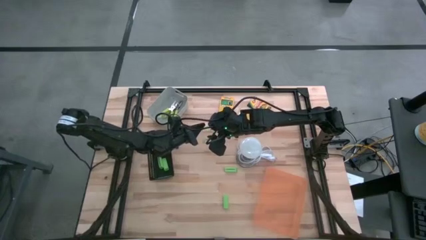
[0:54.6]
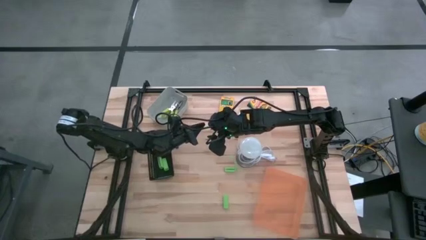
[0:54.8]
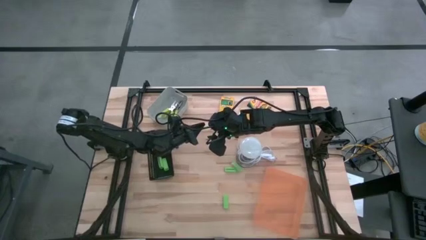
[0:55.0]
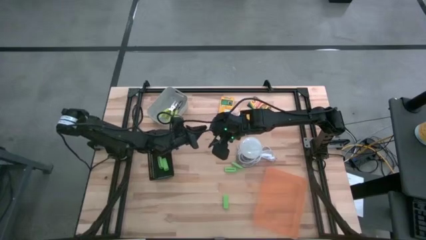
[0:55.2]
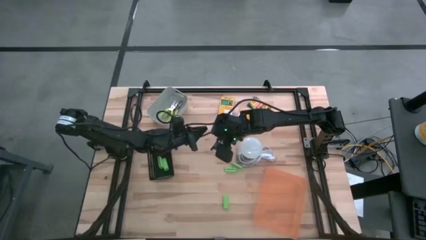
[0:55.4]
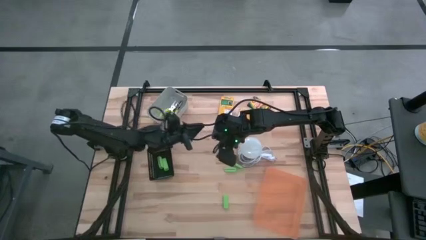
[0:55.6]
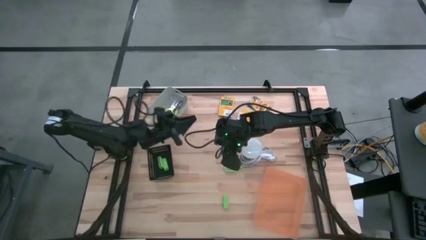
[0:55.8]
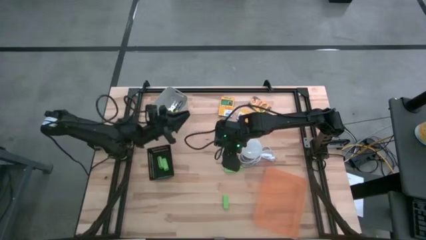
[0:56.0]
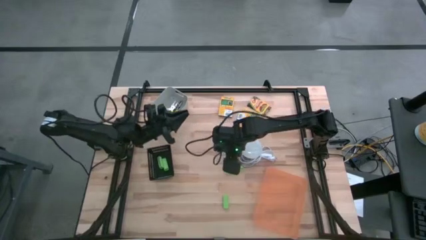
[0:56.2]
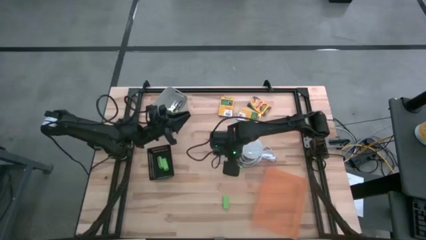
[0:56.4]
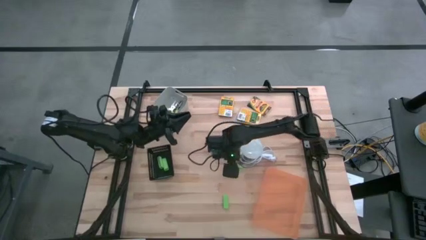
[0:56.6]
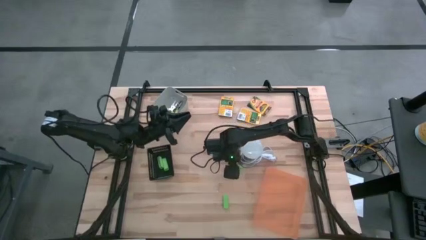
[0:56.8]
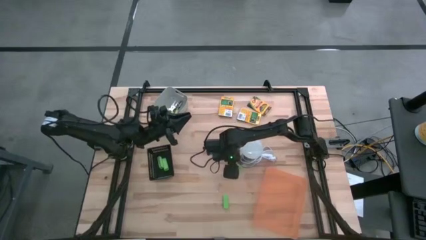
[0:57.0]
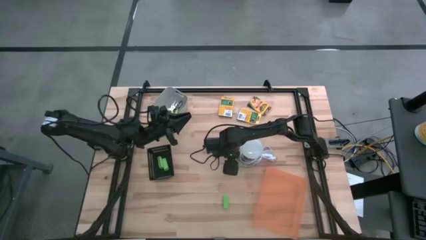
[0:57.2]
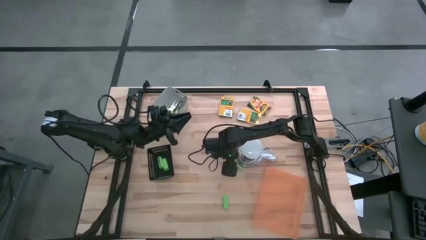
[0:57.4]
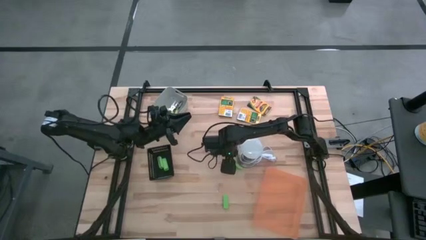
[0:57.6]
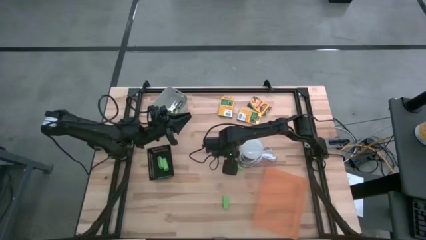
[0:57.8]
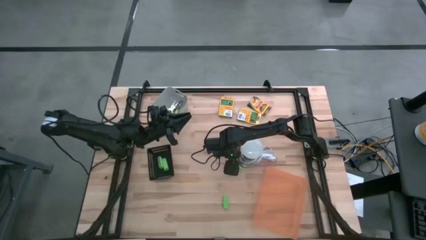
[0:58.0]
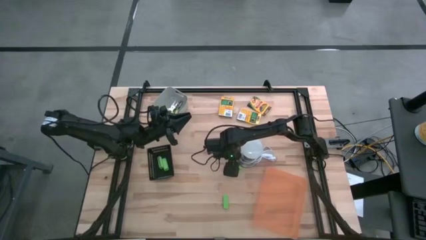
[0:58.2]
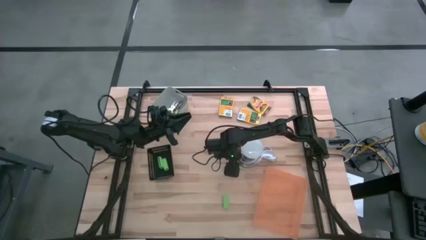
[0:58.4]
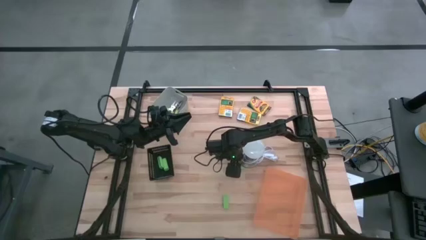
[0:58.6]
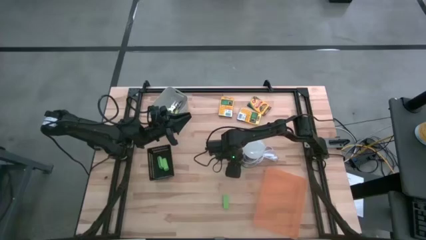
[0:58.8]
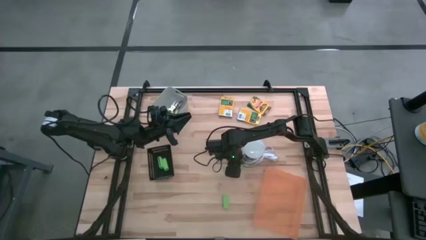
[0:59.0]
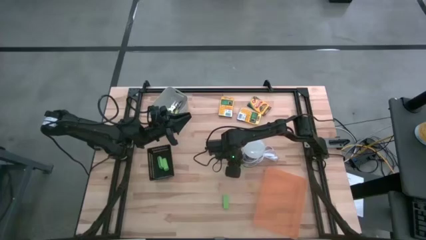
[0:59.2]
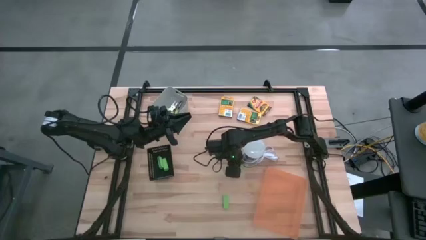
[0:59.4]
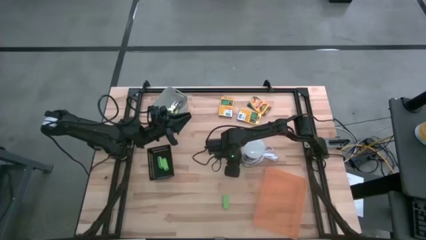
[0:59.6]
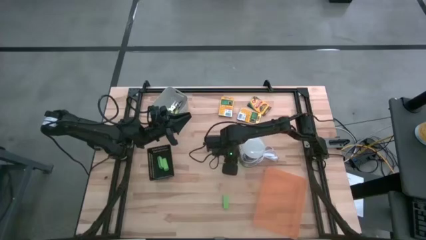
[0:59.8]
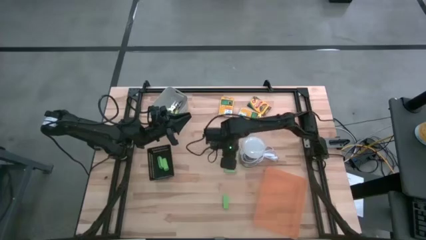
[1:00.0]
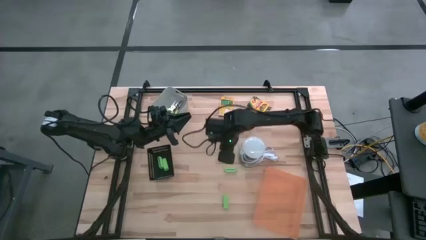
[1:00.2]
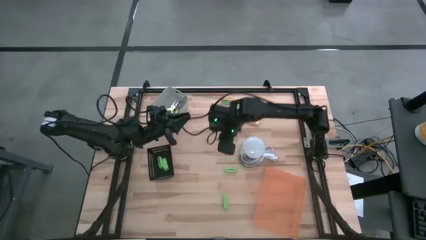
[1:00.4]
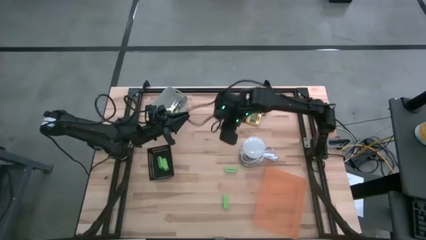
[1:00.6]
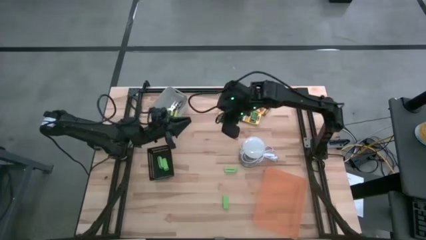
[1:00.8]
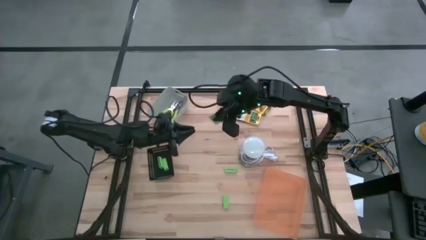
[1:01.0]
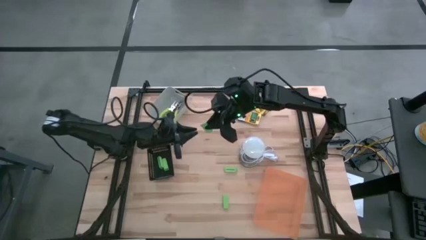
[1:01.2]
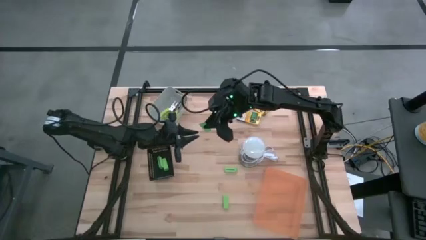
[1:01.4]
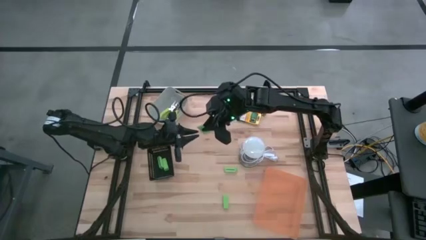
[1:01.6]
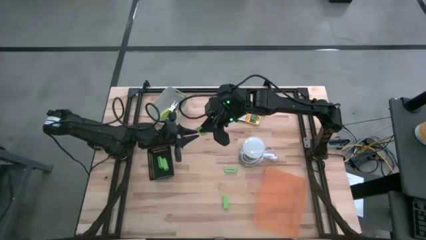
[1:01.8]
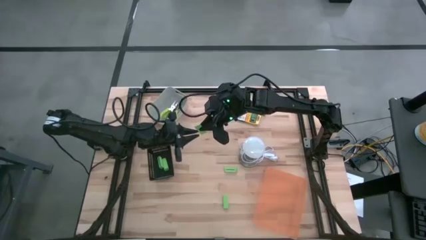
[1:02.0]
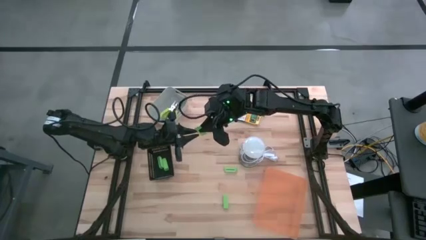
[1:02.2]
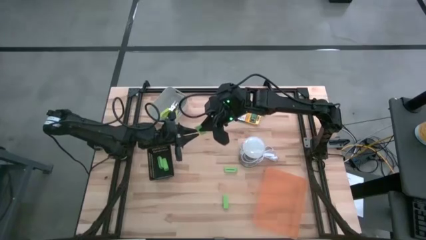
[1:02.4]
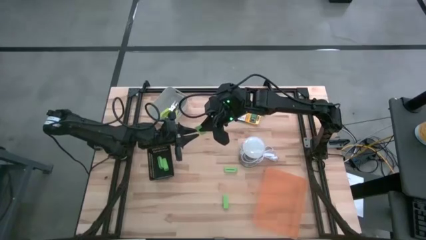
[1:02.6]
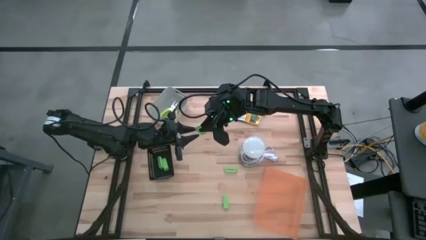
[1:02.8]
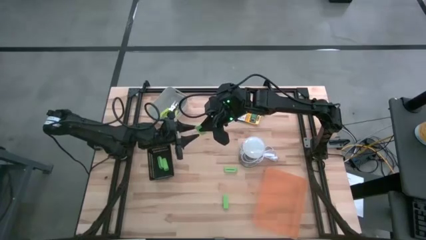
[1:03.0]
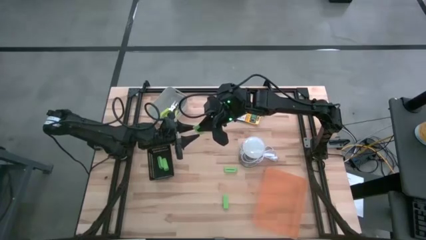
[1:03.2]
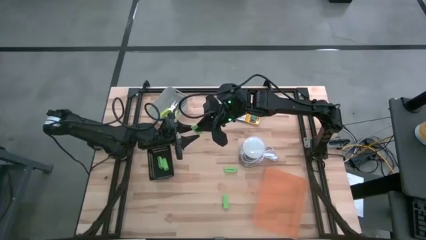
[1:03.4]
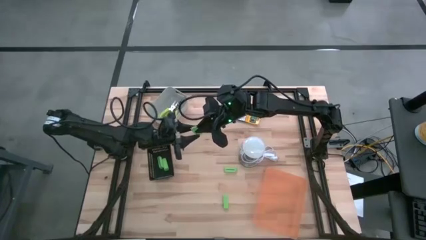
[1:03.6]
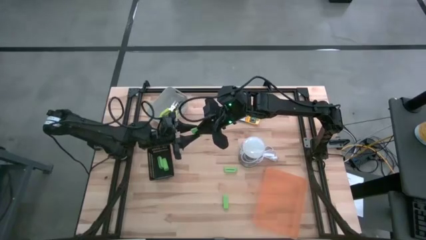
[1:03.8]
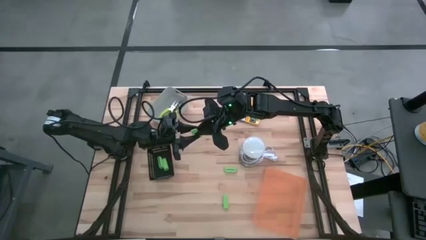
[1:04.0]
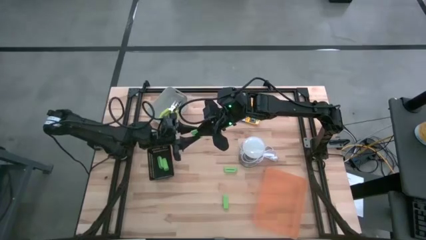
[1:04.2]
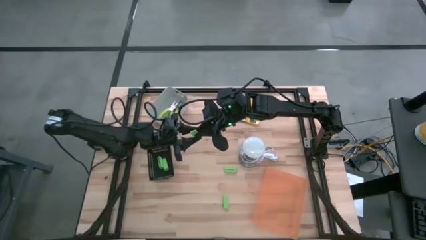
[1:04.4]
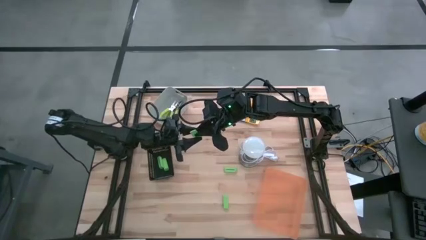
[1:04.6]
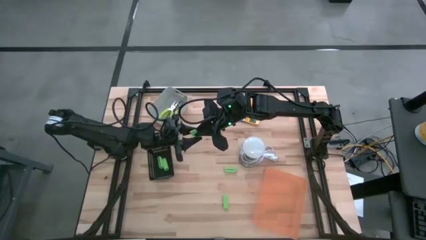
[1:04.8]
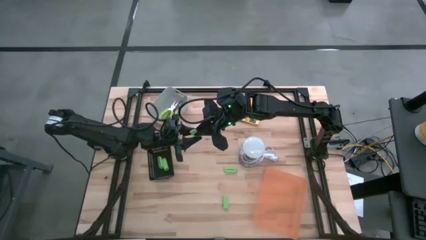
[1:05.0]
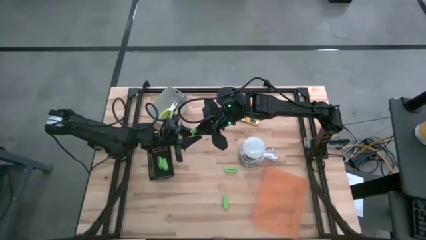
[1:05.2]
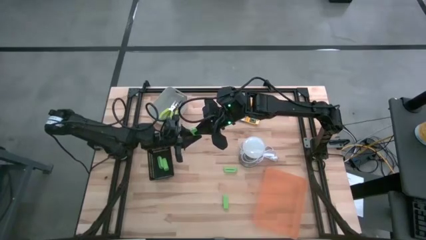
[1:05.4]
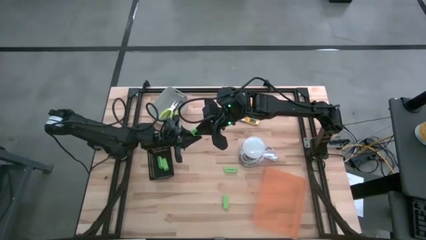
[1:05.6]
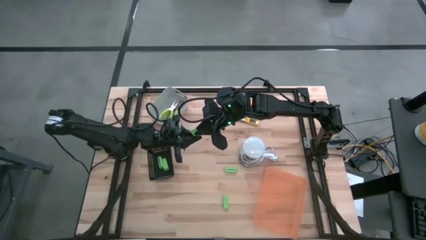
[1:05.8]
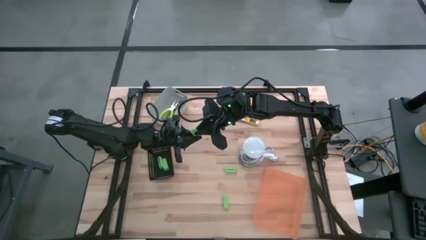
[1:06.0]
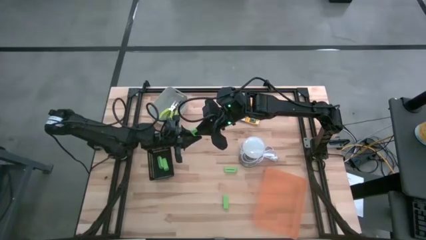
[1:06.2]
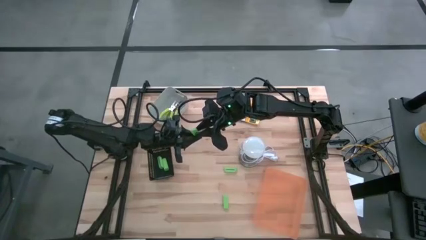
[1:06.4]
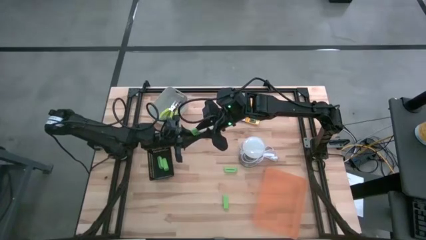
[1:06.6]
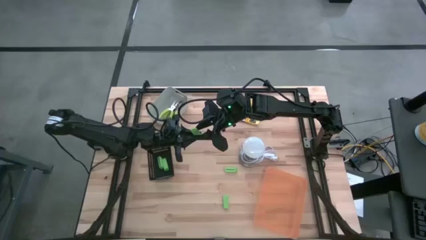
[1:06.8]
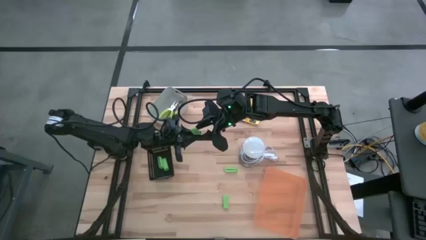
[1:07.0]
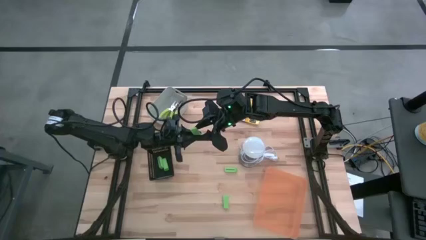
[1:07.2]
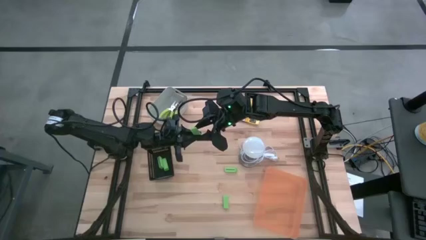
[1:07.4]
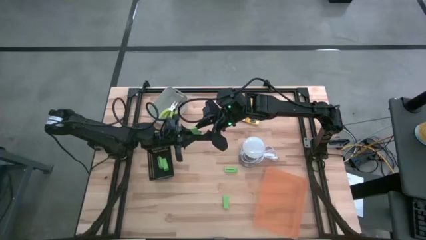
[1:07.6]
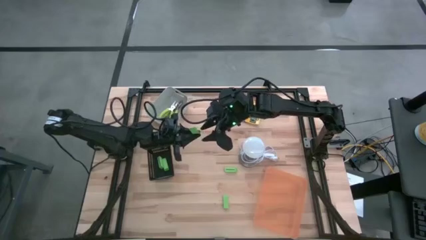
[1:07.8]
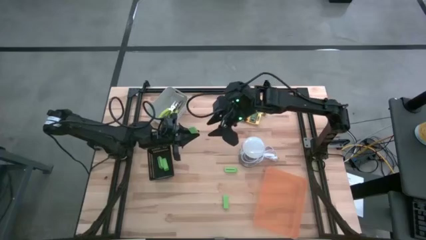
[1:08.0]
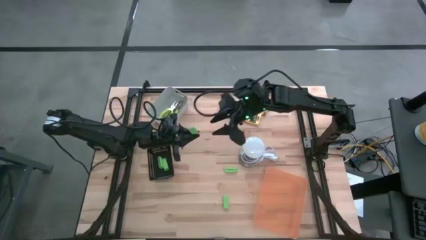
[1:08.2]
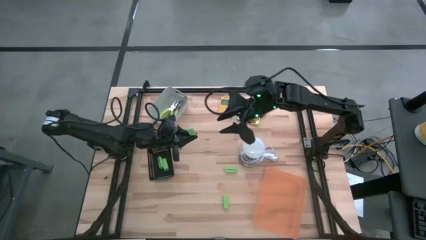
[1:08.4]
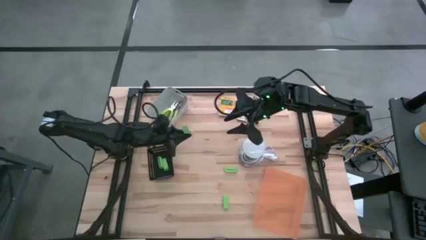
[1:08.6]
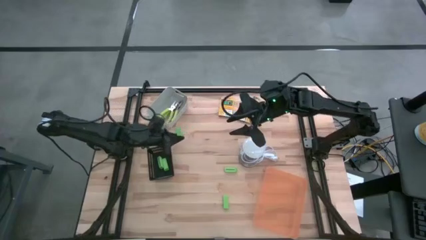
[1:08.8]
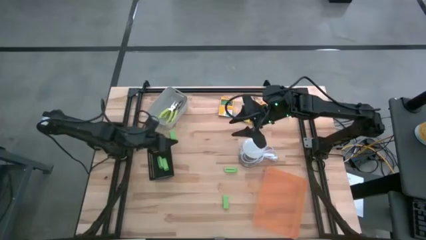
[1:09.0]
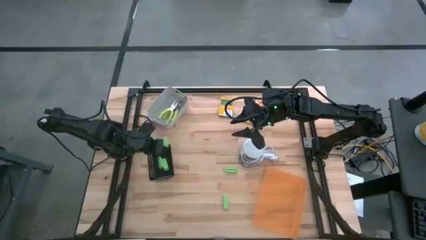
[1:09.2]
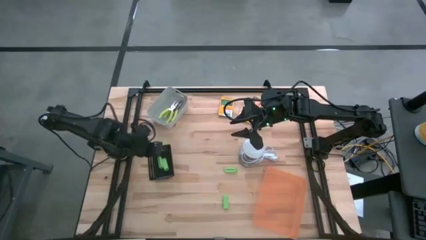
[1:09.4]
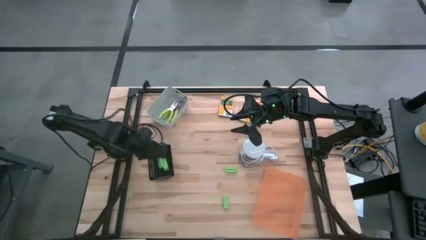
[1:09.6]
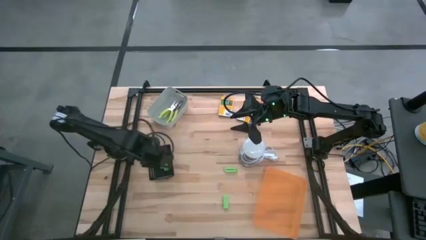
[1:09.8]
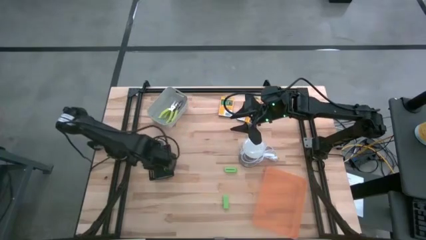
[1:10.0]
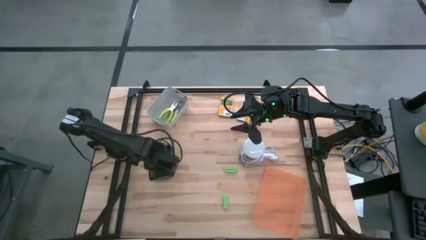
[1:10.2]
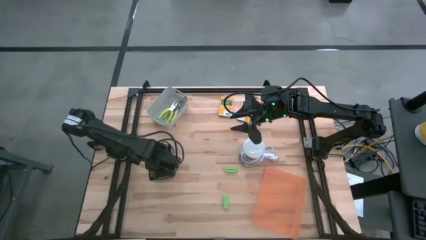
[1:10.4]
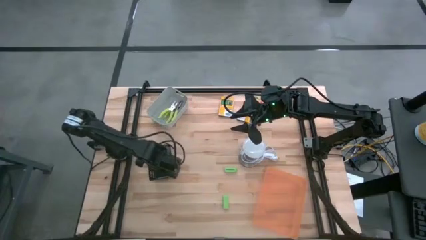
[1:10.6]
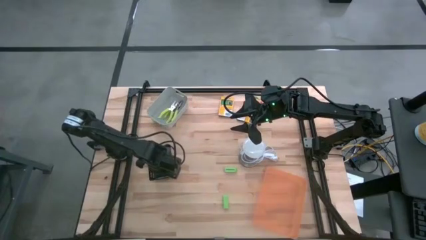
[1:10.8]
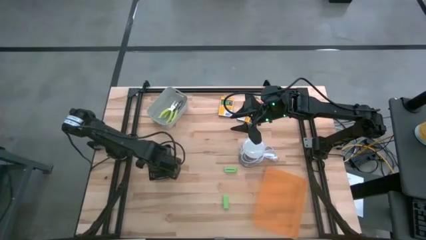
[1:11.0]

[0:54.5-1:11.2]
Task: Pick & Place School Supplies
Put the green eraser into the black bin
